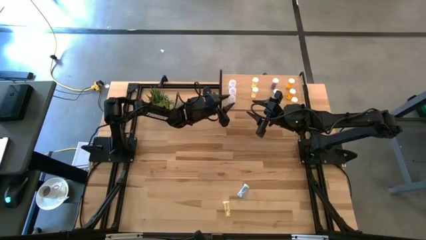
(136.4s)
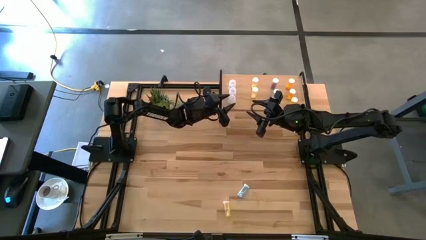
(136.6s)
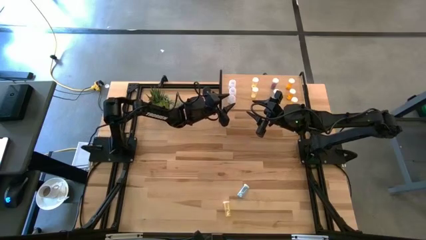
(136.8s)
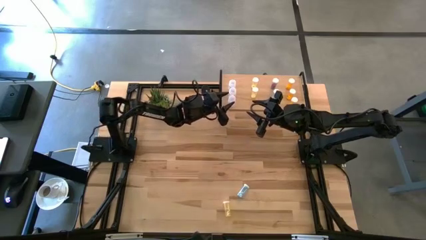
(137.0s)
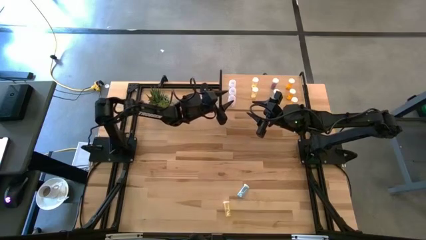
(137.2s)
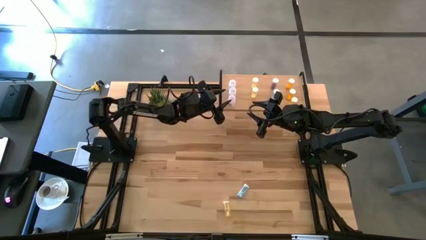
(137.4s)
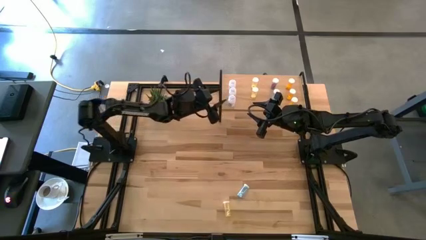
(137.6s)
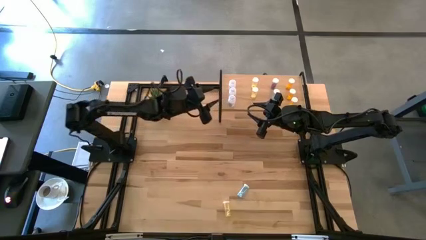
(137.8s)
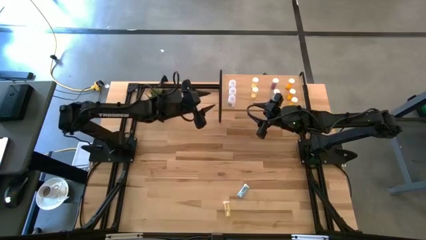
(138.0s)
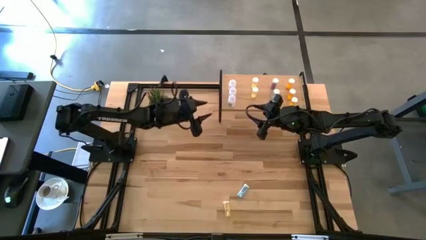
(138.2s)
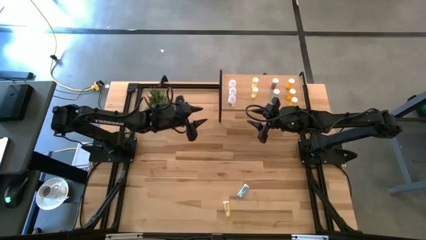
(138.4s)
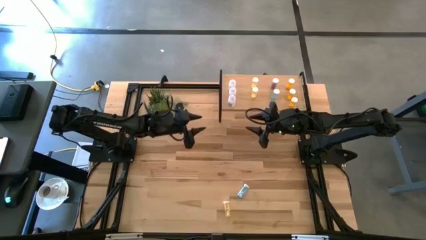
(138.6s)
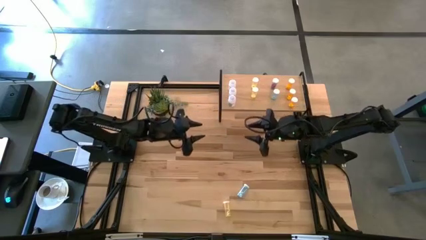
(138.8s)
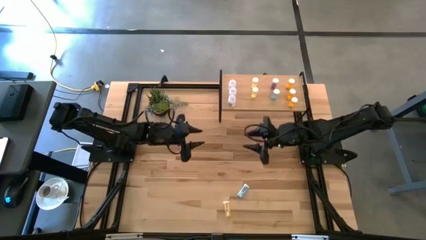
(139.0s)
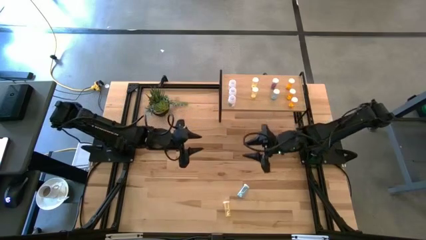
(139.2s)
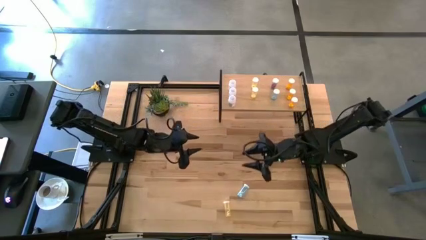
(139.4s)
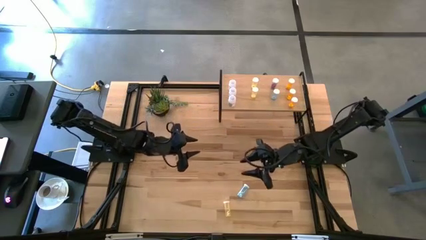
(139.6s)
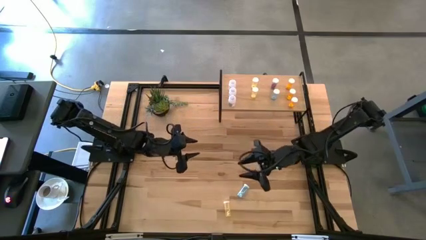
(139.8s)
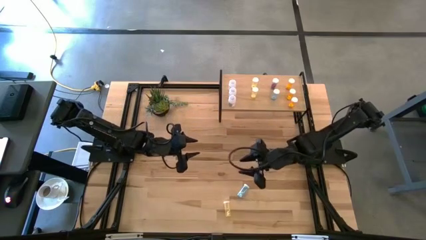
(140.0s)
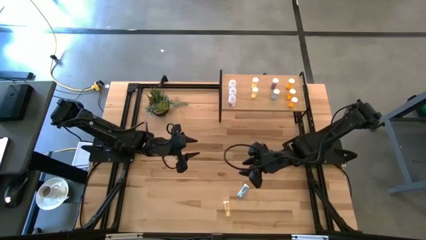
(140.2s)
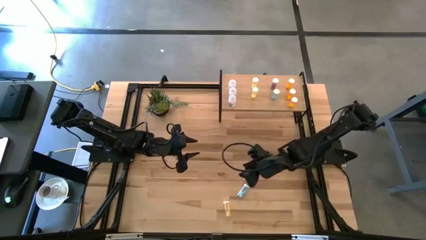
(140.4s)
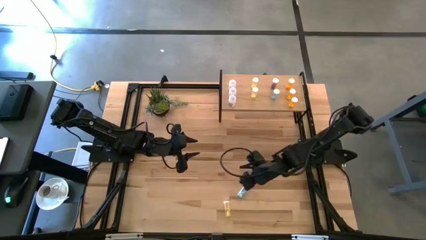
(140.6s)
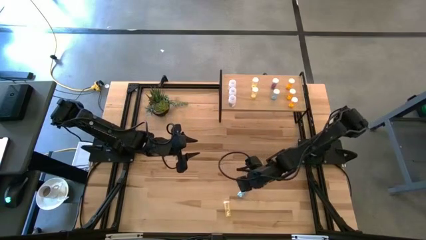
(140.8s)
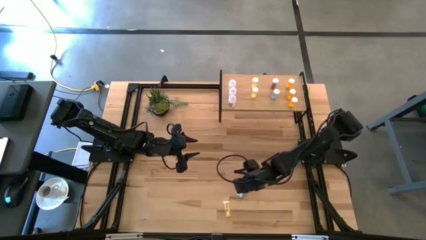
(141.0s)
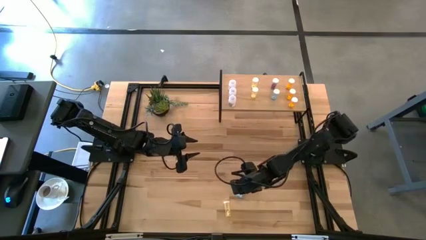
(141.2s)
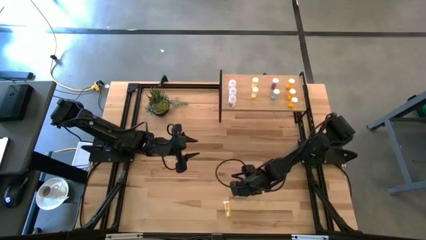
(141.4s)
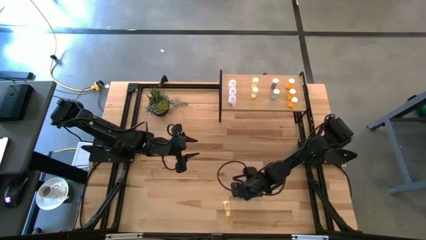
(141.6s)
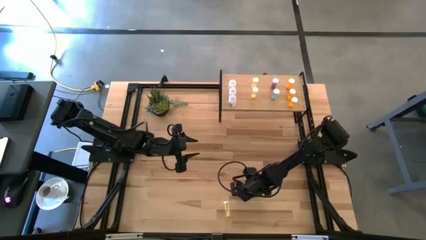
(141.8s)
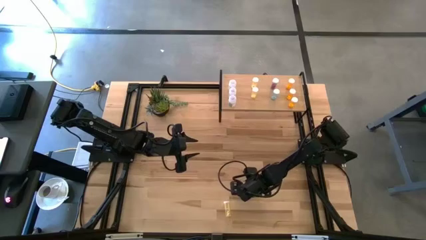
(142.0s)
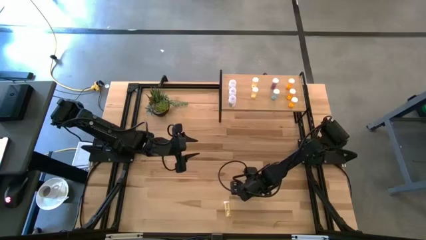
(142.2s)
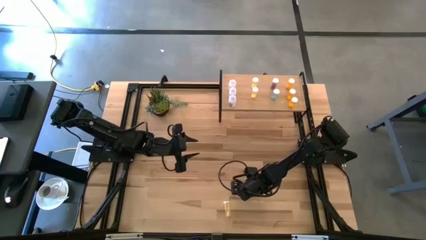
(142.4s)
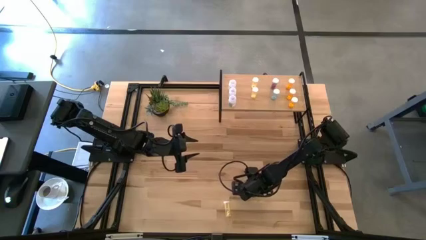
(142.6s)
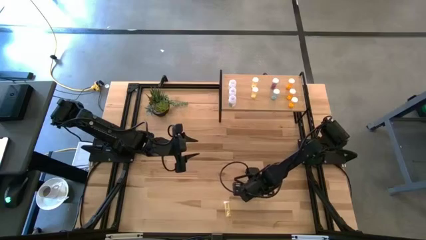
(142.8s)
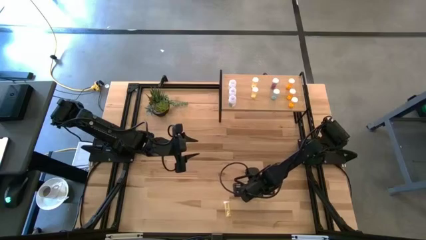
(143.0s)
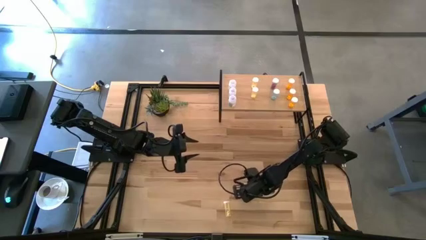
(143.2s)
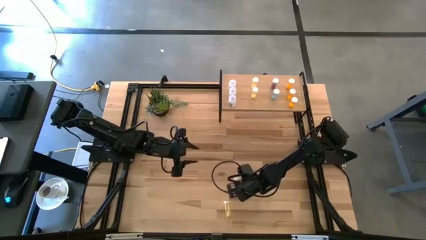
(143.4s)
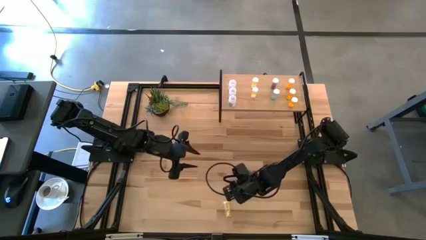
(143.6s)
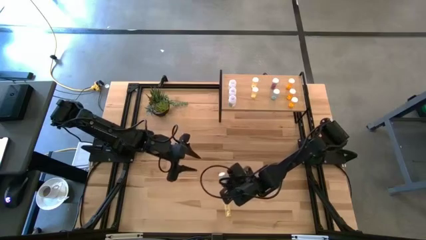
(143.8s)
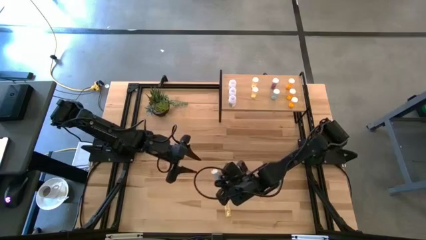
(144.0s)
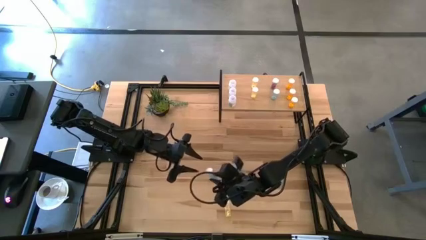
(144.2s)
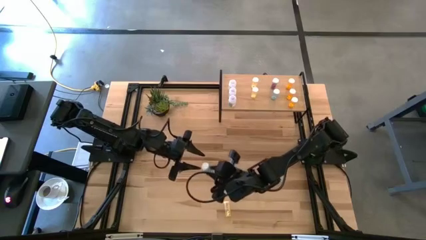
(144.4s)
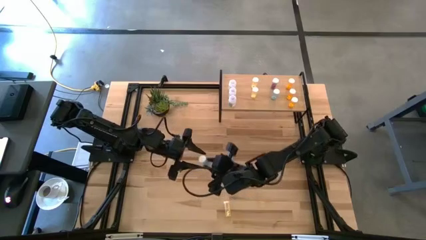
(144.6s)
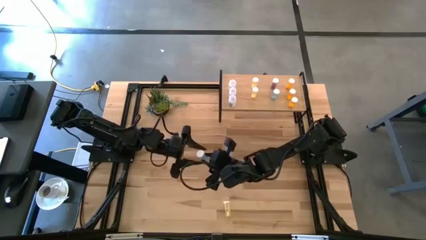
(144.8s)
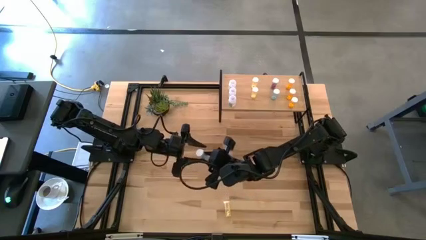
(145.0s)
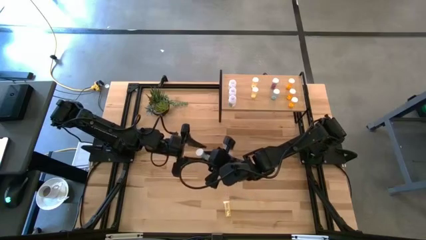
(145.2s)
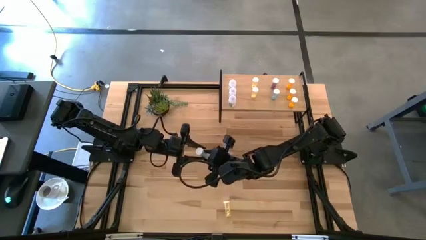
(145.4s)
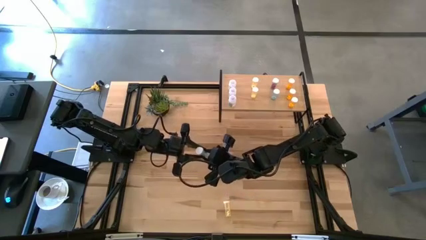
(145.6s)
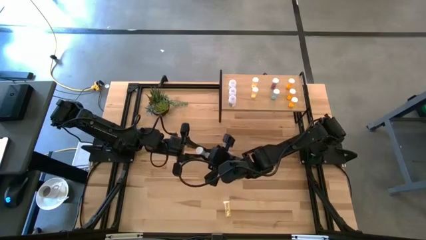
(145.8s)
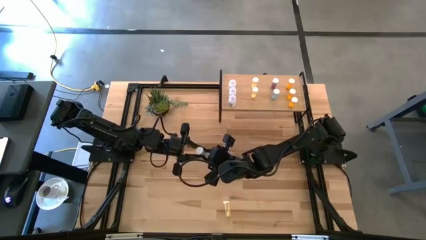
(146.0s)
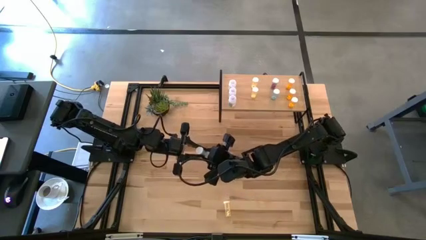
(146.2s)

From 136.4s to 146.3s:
Task: Pick and place medicine bottles onto shelf by color
Put the blue pill bottle aligned with the other blue pill bottles on the shelf

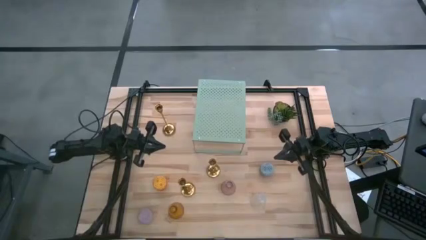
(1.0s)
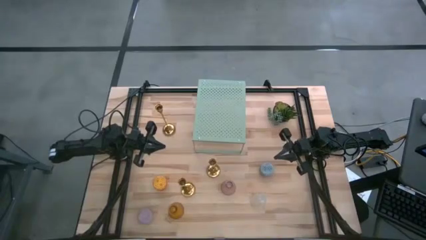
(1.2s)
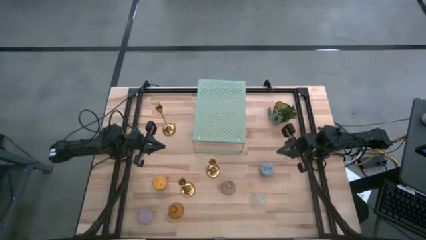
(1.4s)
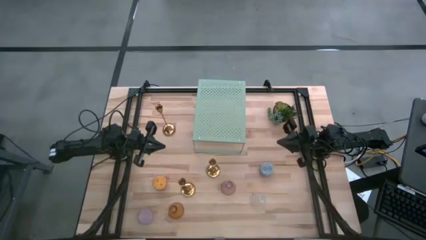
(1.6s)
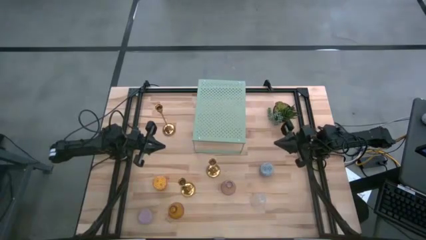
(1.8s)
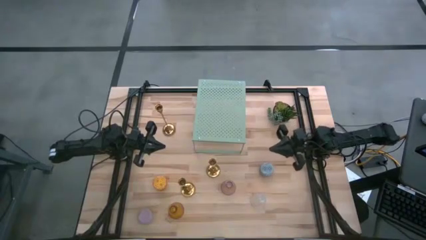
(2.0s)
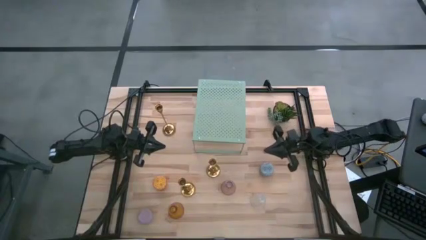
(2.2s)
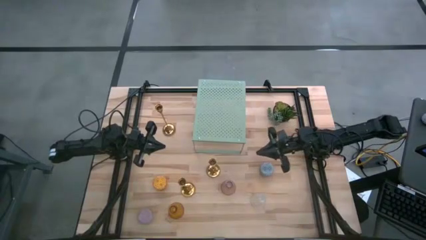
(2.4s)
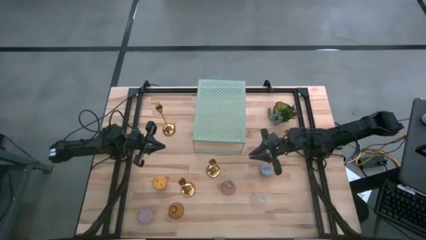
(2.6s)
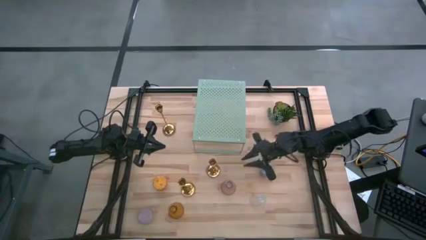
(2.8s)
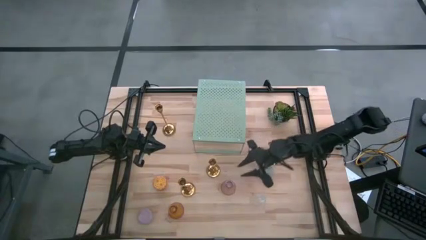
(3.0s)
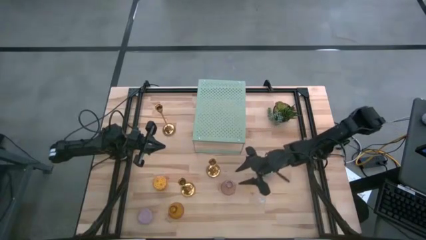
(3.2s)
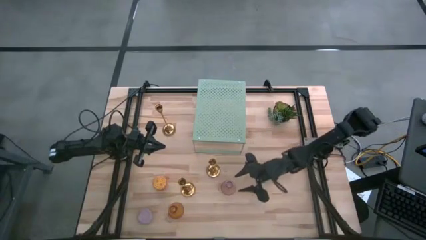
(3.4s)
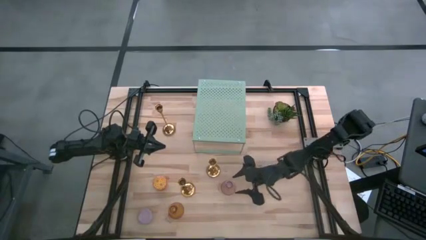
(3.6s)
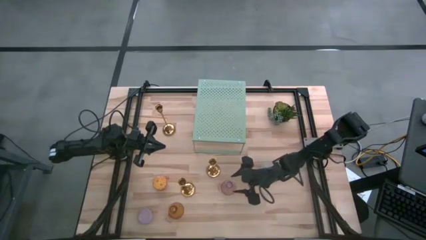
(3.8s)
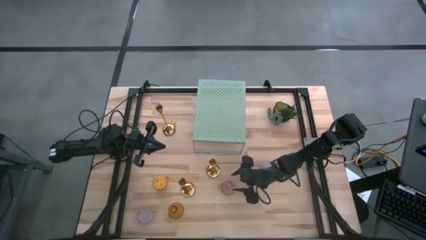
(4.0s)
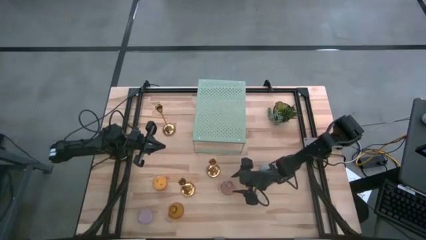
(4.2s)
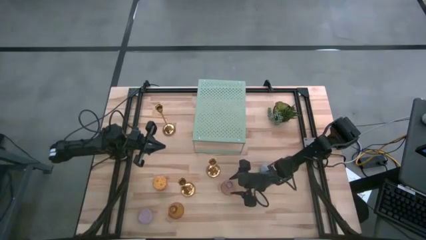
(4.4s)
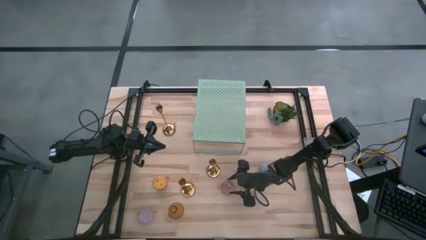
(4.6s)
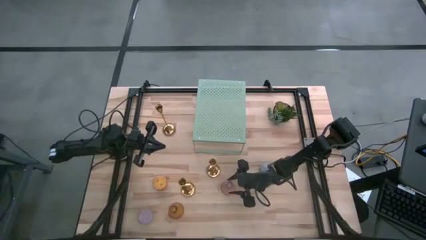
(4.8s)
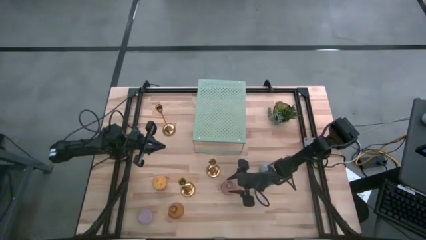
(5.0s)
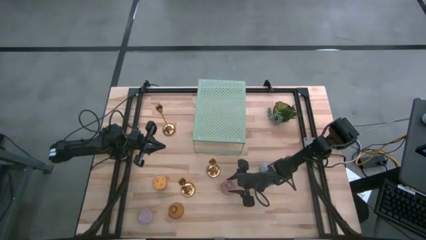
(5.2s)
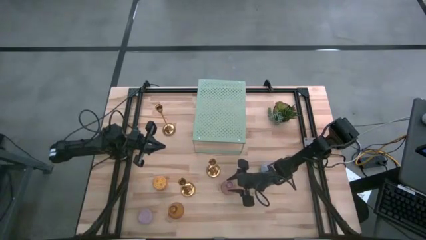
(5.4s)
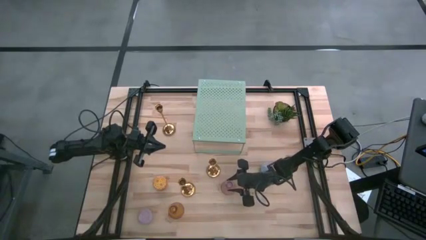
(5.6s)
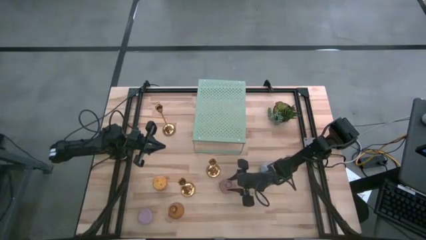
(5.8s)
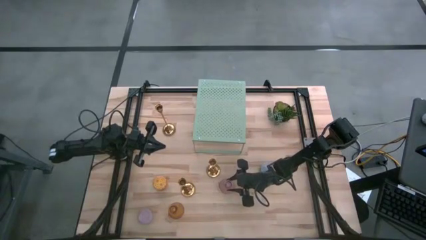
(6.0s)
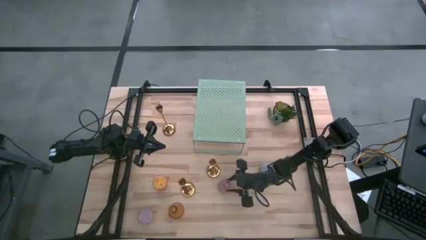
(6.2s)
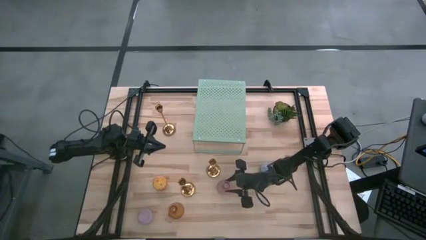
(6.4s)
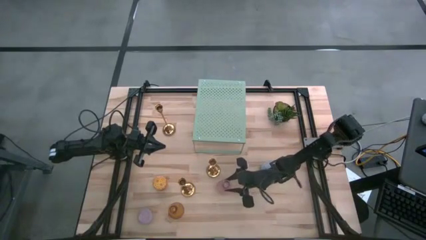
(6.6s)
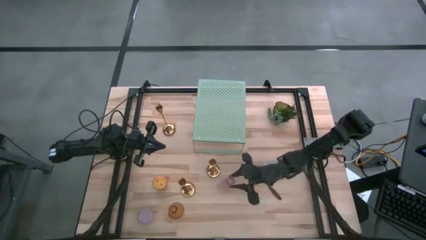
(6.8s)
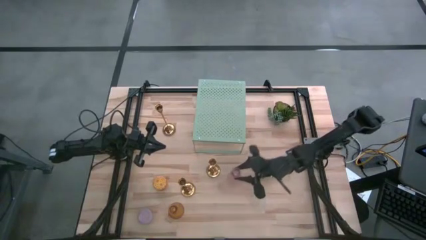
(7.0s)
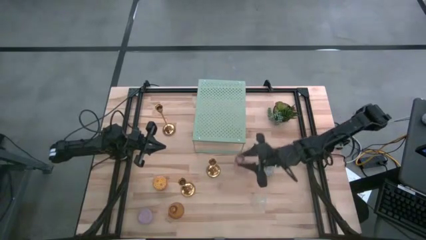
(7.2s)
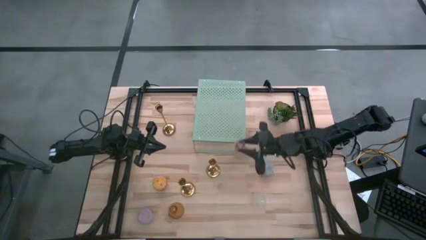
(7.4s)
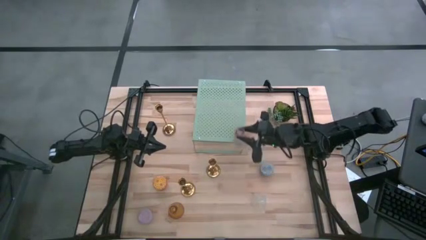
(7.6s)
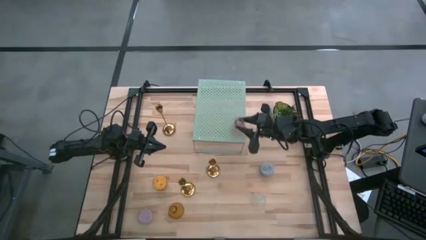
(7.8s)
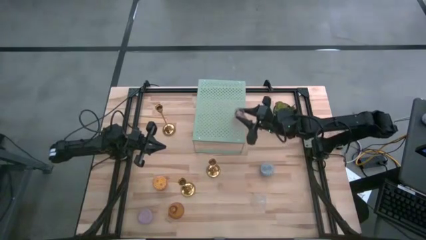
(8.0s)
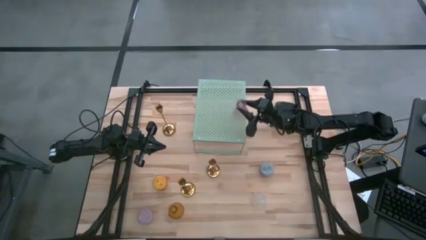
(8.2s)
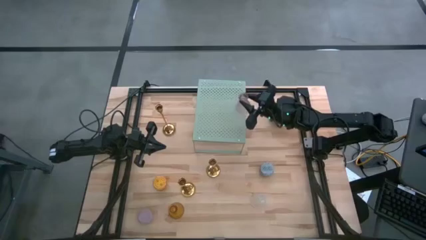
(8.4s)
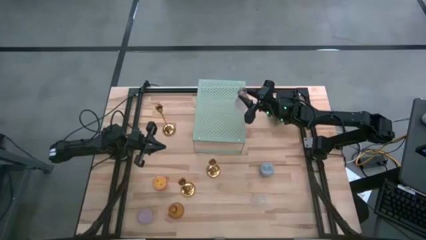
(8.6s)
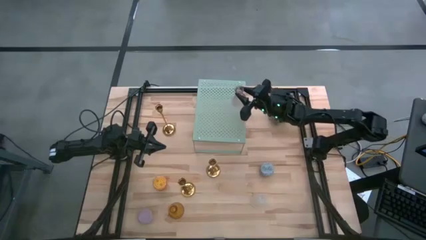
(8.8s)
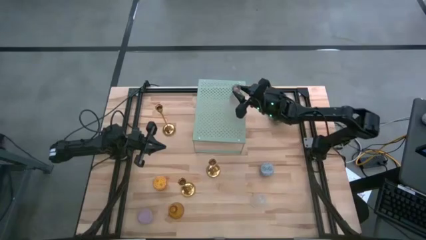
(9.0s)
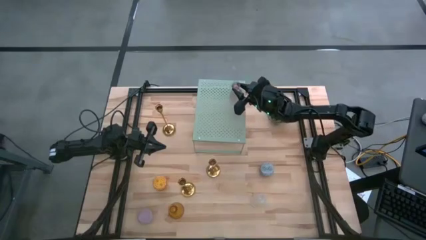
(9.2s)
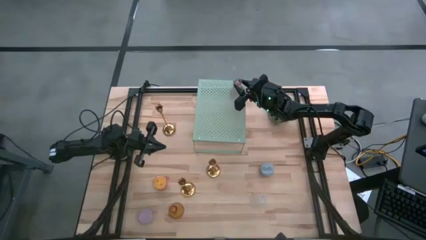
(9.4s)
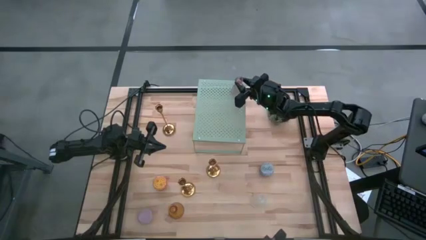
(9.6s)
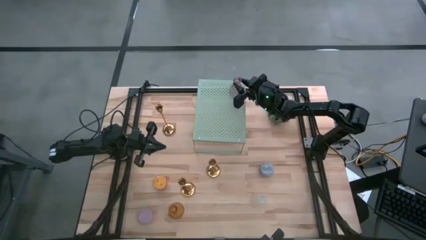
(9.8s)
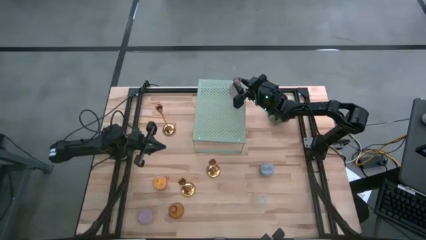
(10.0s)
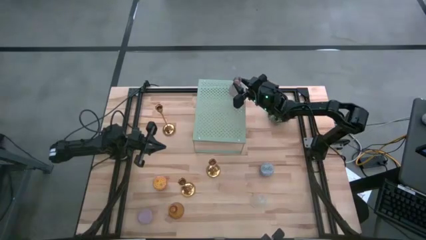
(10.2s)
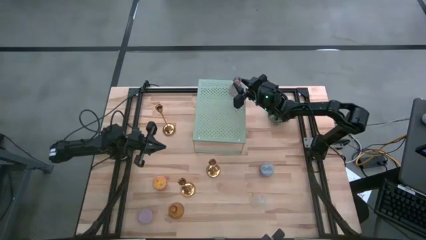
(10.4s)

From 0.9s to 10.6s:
Task: Stock candles on shelf
Put the pink candle vase on the shelf
